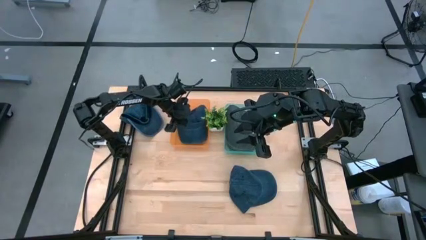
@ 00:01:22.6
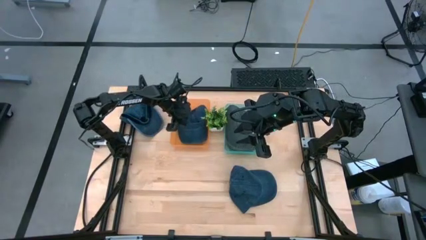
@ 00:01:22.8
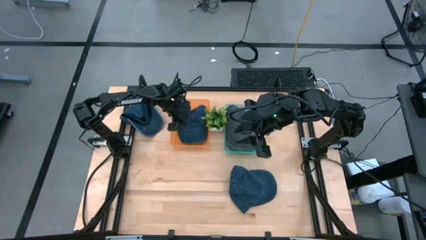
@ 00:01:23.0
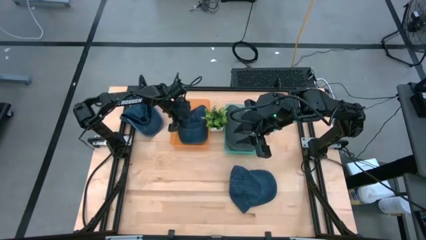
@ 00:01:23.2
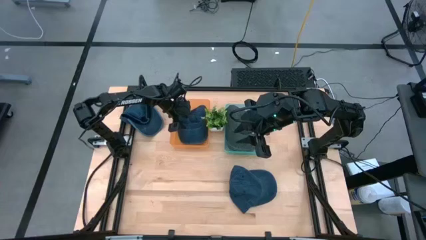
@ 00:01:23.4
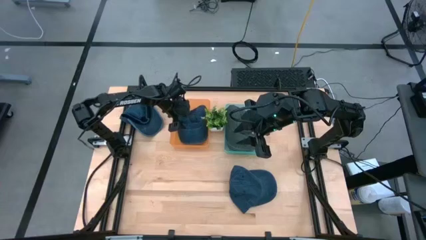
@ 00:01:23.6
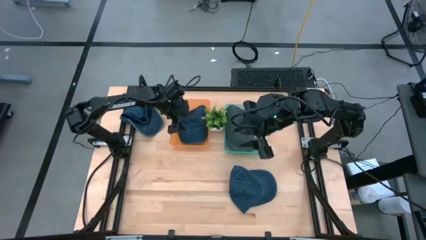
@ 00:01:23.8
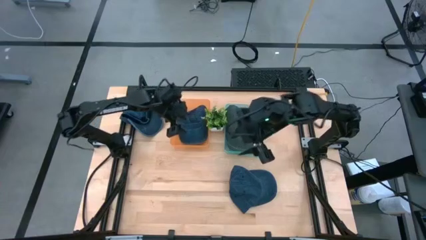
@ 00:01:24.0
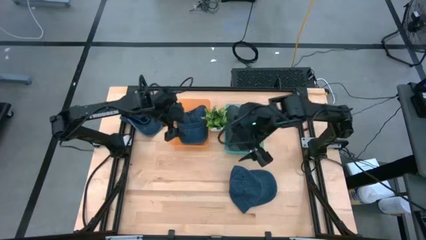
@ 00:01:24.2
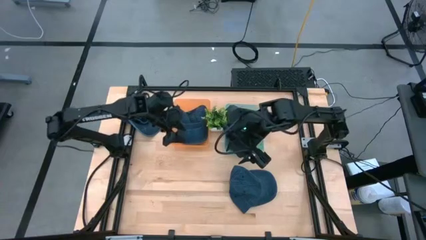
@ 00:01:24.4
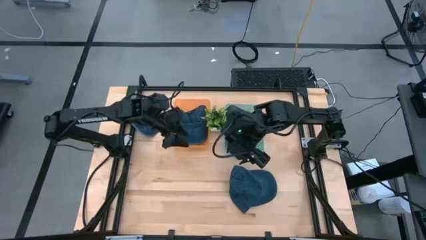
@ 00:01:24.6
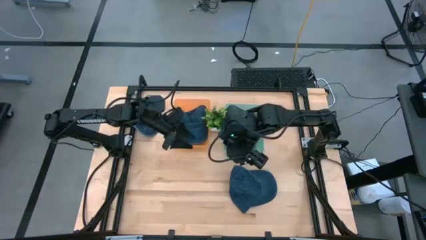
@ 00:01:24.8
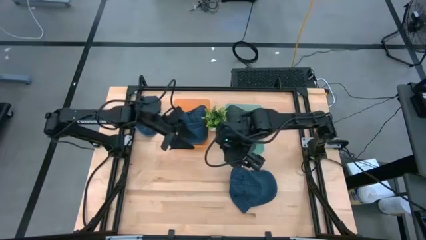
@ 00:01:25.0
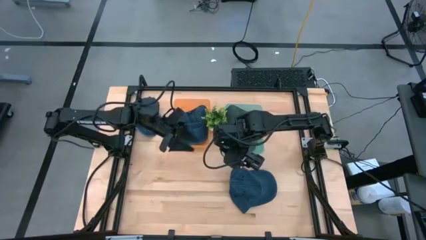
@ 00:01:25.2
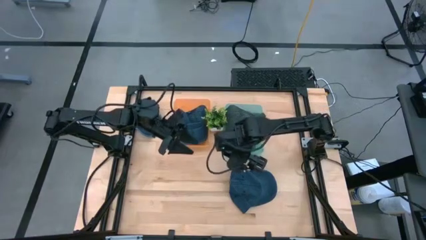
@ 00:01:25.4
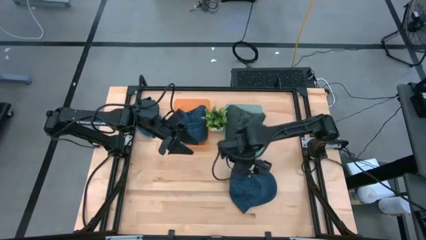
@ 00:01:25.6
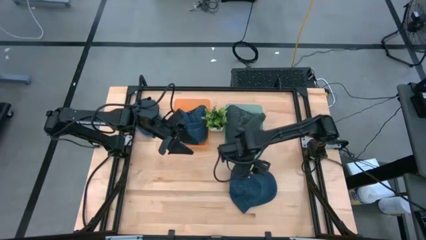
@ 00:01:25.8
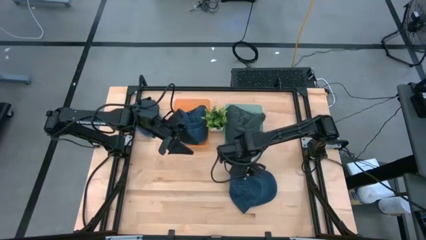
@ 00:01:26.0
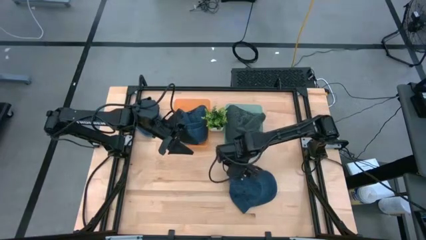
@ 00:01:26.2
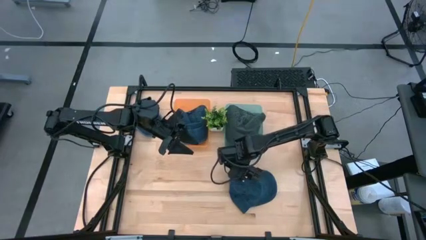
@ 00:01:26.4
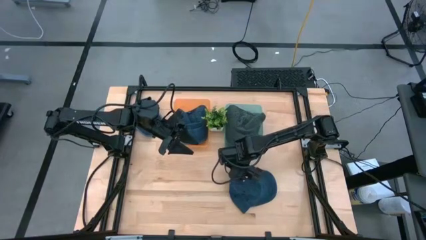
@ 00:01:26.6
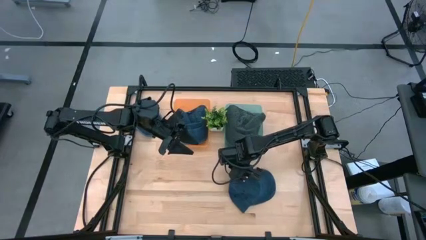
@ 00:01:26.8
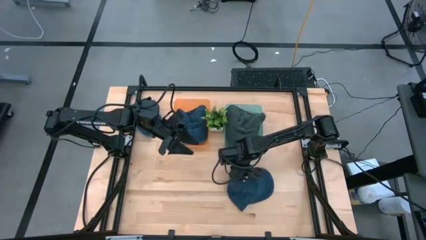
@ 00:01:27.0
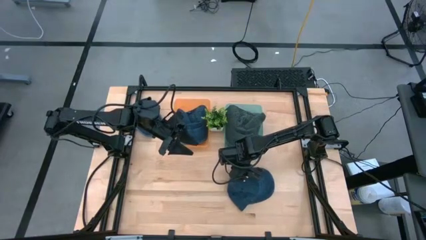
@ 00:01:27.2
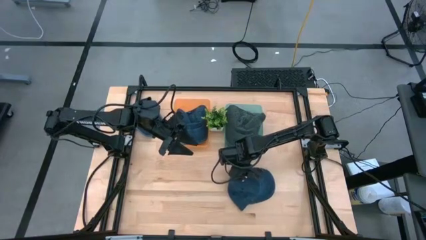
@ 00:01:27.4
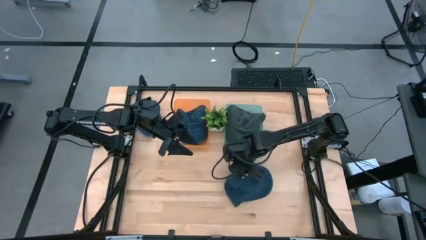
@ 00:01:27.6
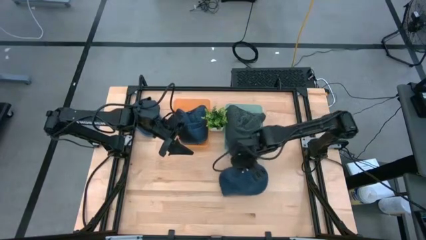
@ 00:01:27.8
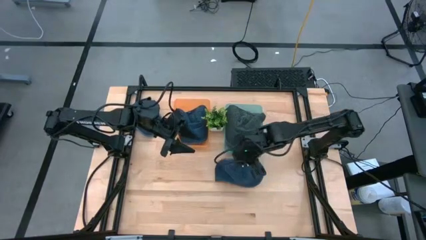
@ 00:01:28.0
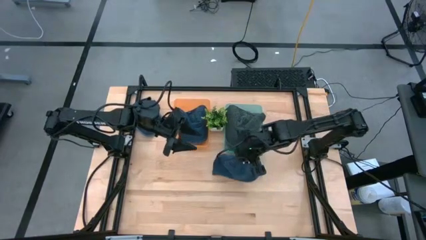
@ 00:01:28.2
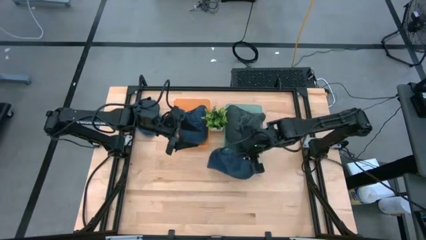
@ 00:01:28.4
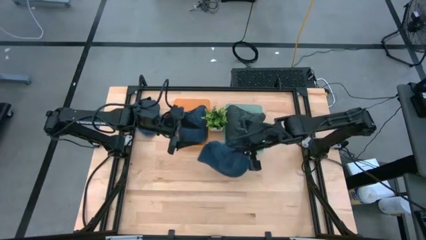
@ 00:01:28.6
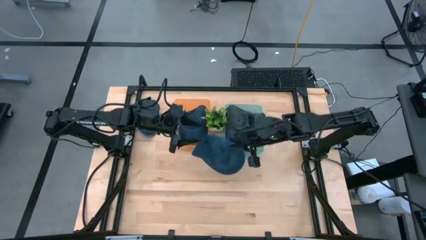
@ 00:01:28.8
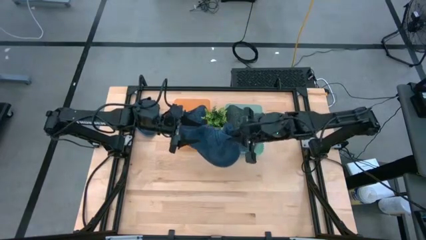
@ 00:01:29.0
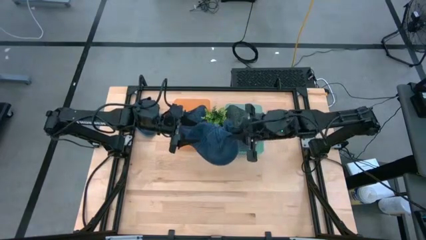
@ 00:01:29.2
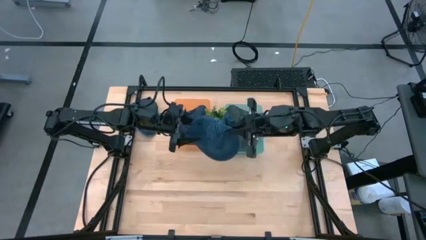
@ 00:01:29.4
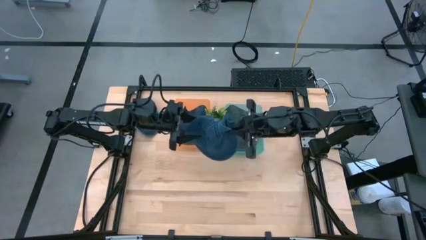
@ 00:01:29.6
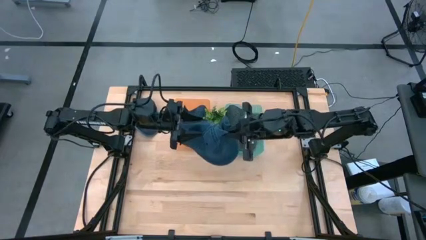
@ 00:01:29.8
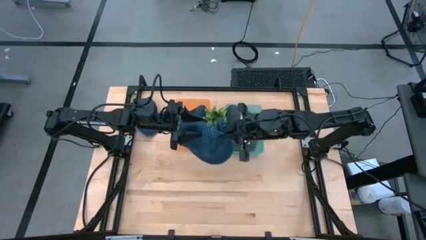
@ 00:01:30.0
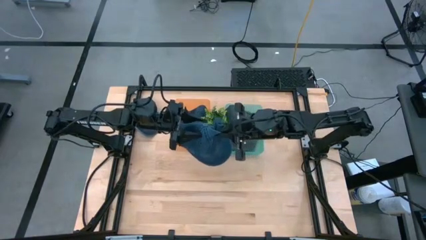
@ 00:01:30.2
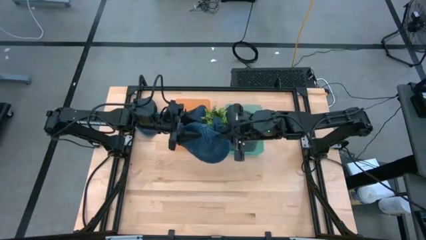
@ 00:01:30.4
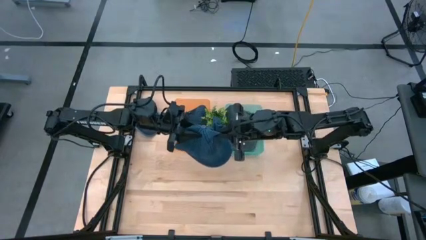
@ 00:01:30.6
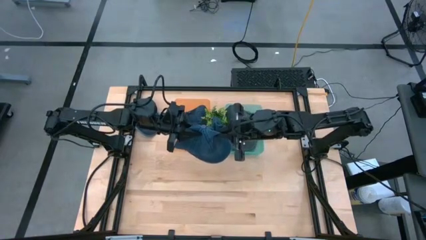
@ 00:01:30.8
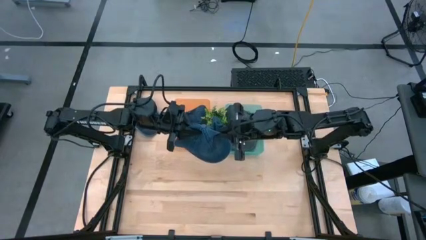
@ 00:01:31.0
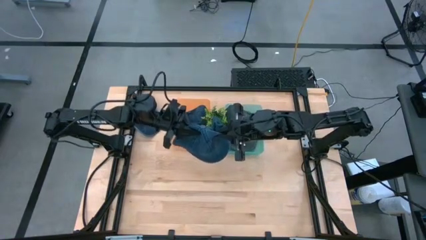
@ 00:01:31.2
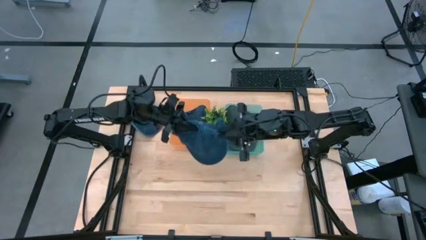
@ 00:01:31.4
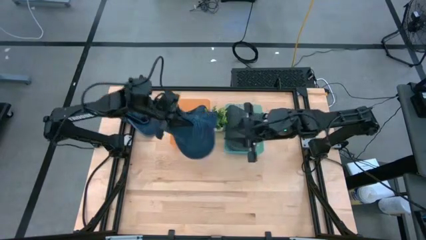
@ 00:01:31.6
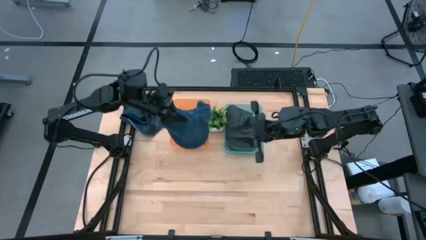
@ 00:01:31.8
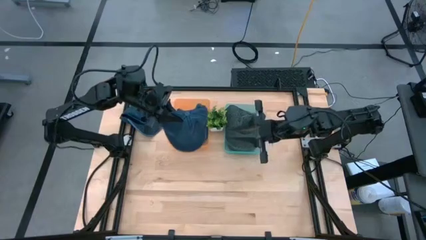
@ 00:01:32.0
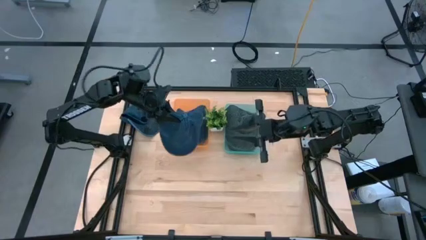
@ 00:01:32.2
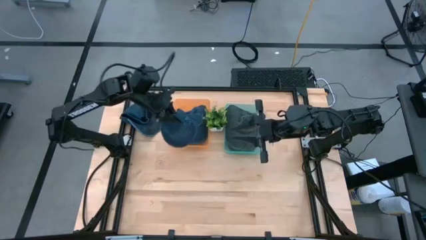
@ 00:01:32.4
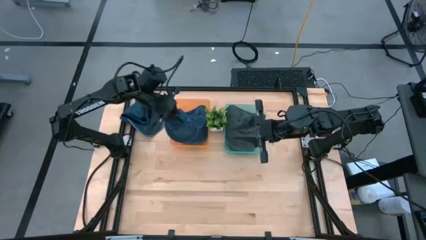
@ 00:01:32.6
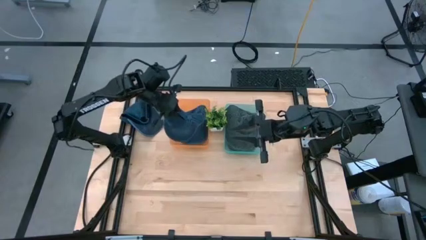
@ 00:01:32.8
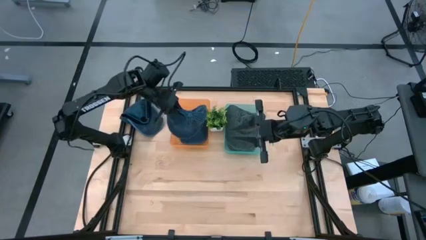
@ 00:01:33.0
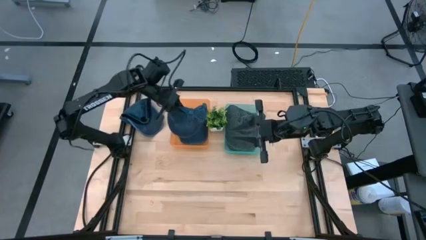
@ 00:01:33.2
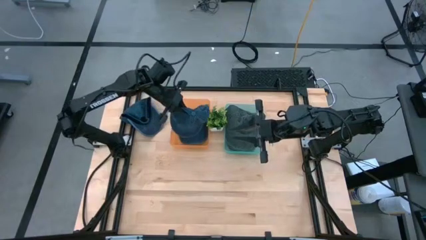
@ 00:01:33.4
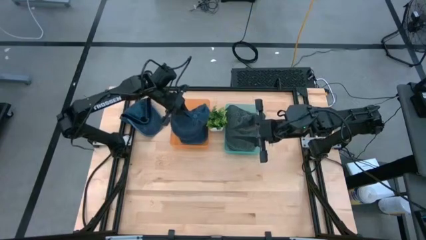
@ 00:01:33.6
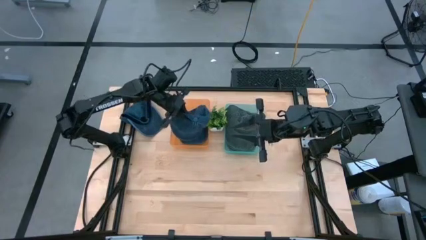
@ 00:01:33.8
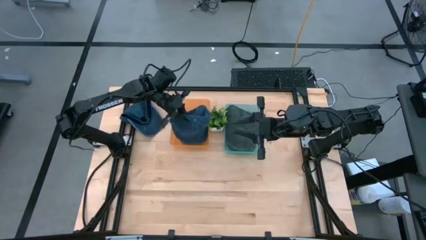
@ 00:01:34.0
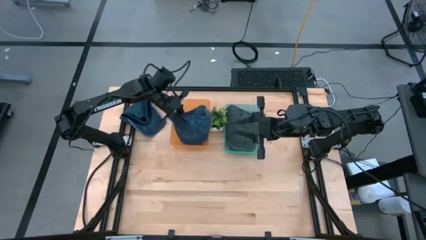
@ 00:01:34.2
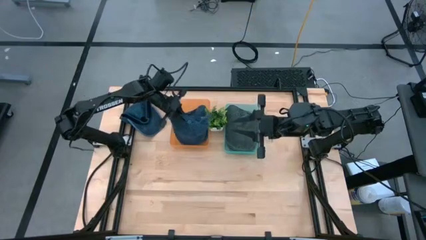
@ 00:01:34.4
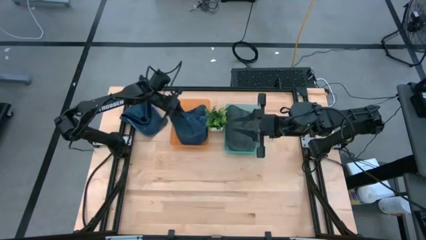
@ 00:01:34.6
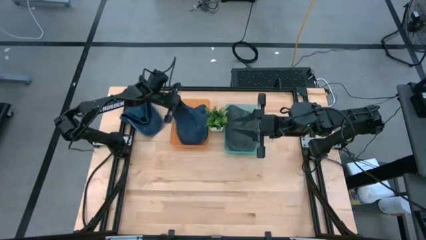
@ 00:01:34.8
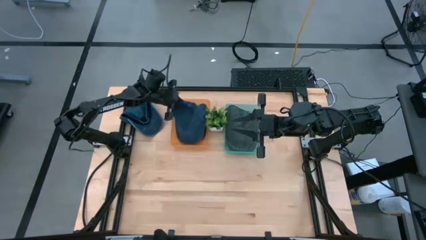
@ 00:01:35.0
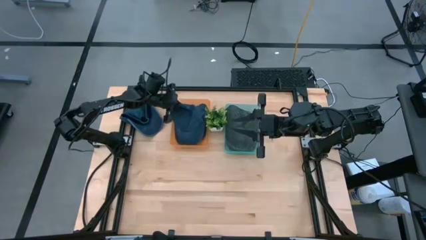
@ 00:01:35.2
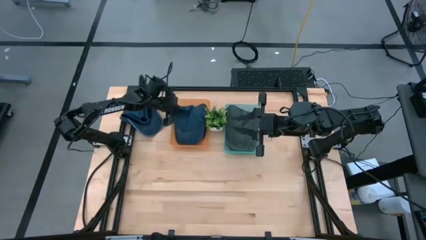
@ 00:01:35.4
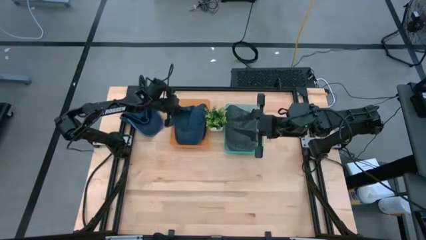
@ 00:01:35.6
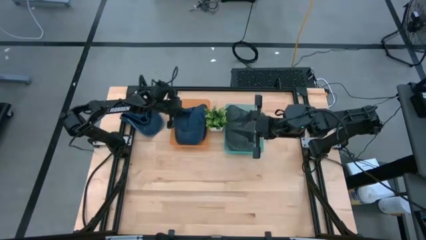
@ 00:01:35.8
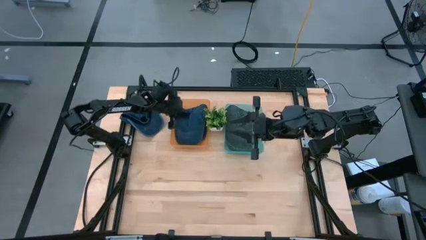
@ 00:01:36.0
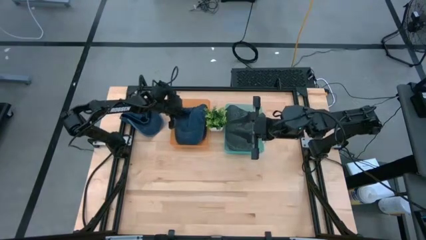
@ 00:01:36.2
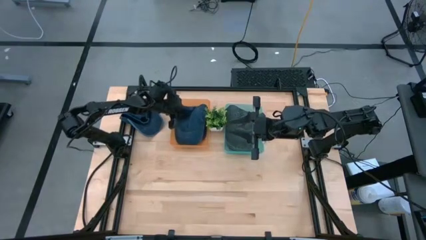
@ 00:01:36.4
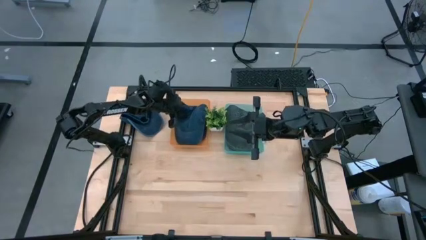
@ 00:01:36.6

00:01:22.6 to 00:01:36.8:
Task: Pick & Place hat
Put the bottom blue cap into the orange bin
